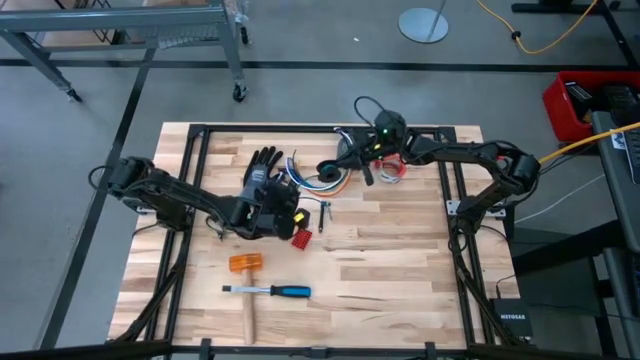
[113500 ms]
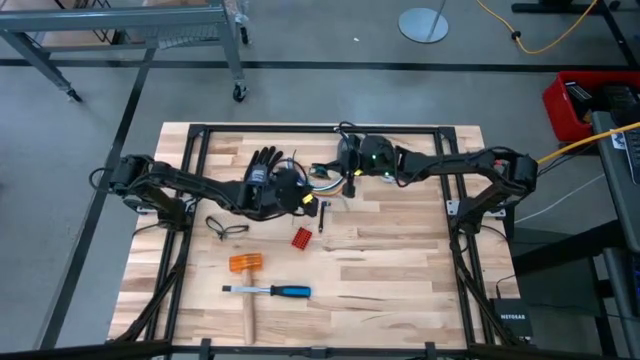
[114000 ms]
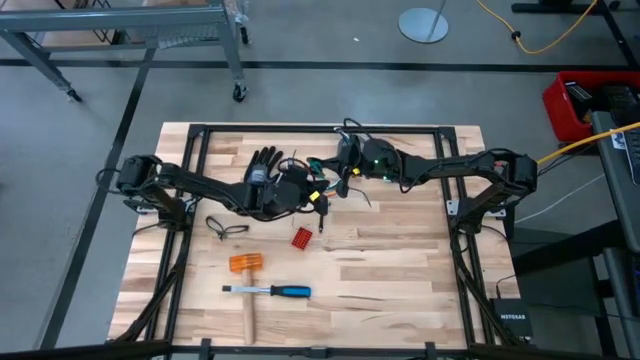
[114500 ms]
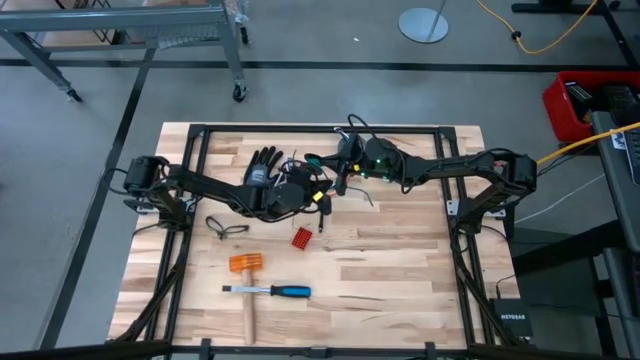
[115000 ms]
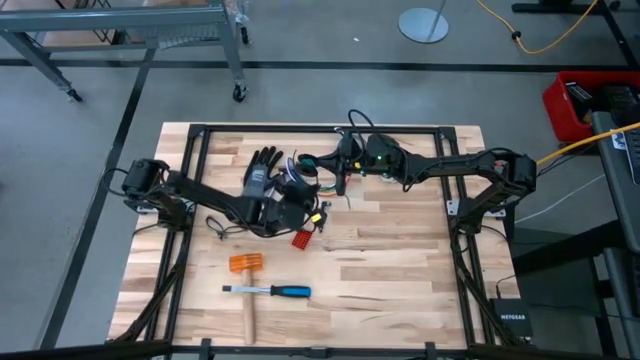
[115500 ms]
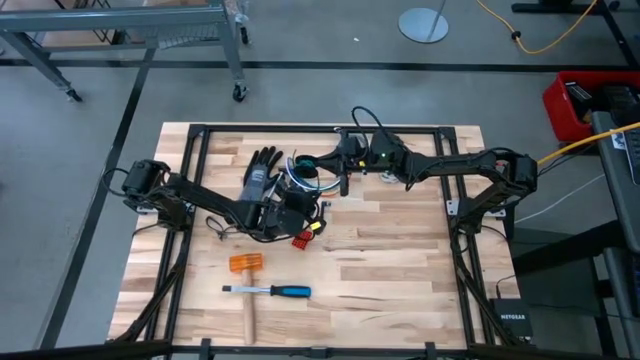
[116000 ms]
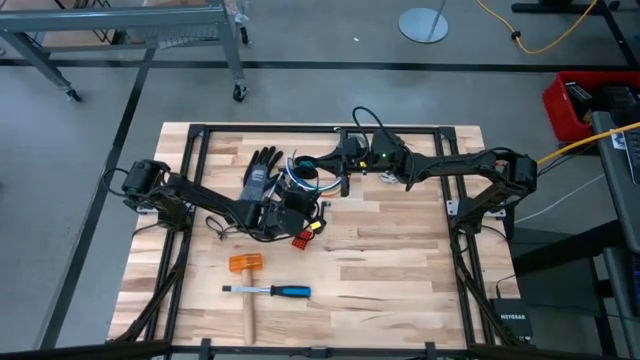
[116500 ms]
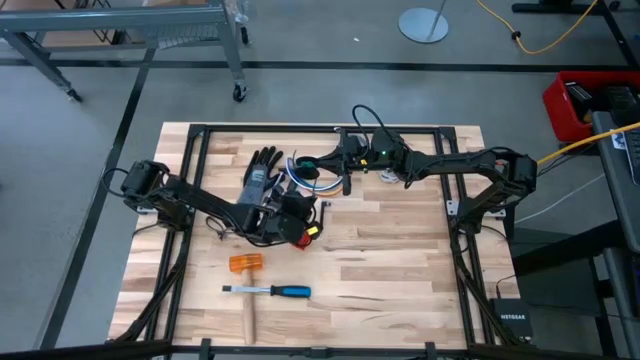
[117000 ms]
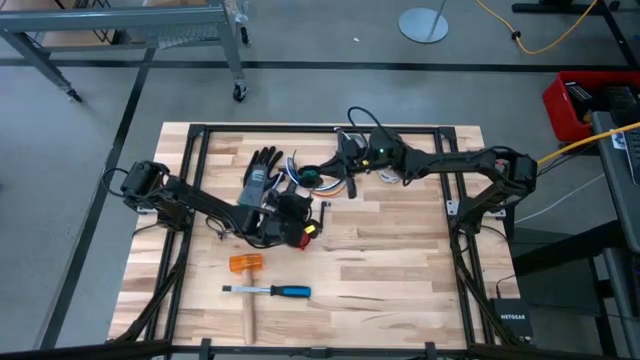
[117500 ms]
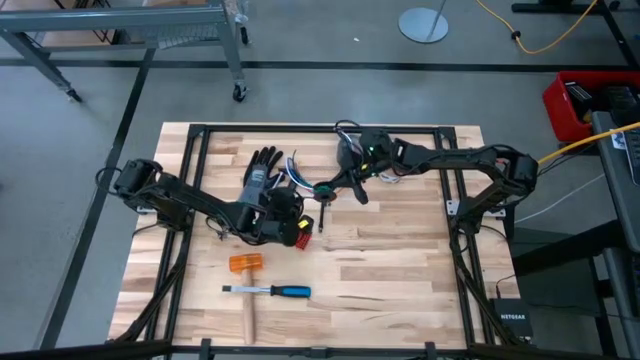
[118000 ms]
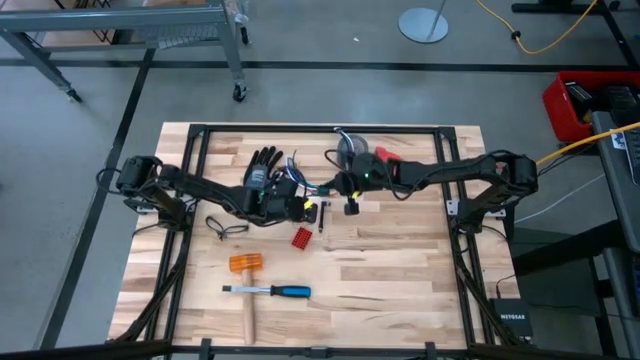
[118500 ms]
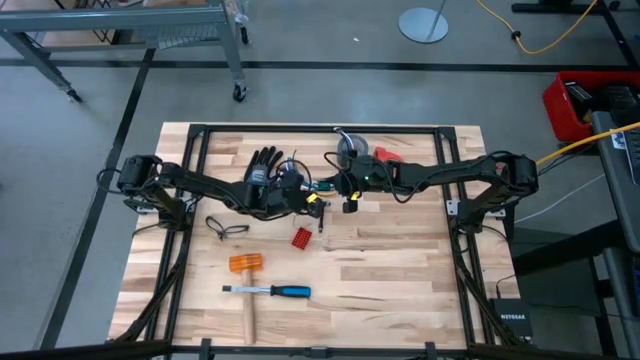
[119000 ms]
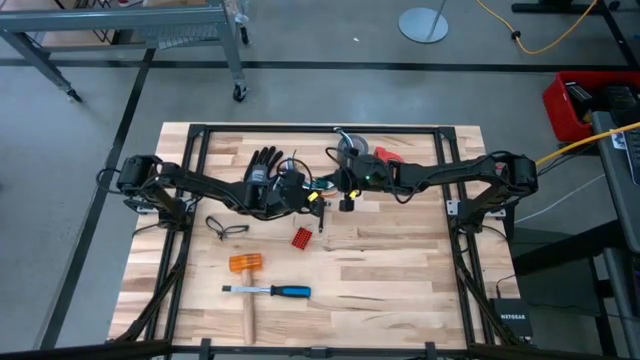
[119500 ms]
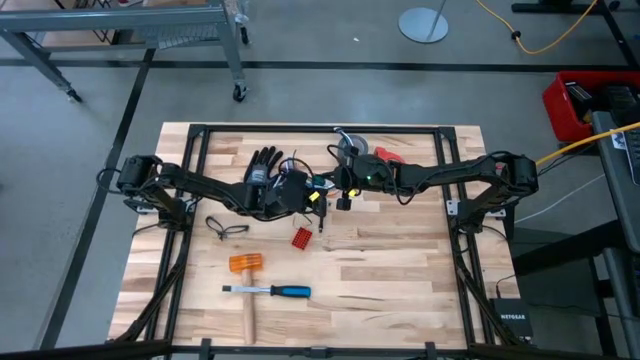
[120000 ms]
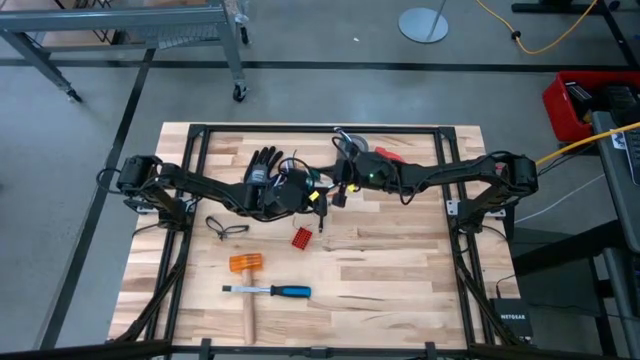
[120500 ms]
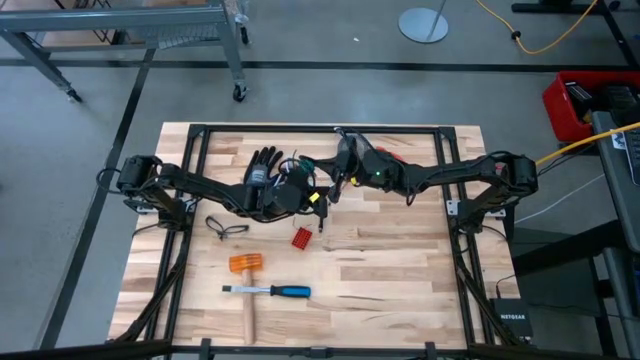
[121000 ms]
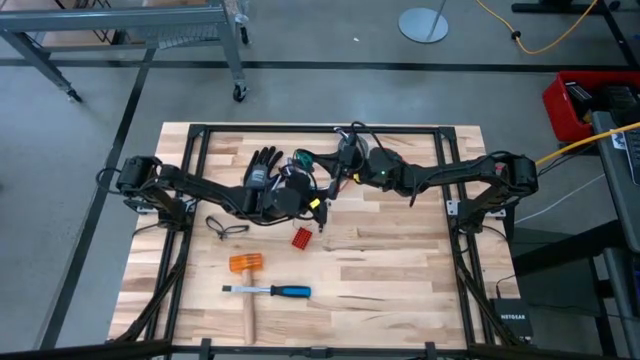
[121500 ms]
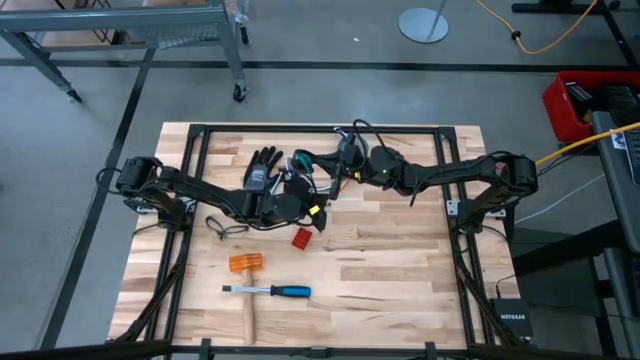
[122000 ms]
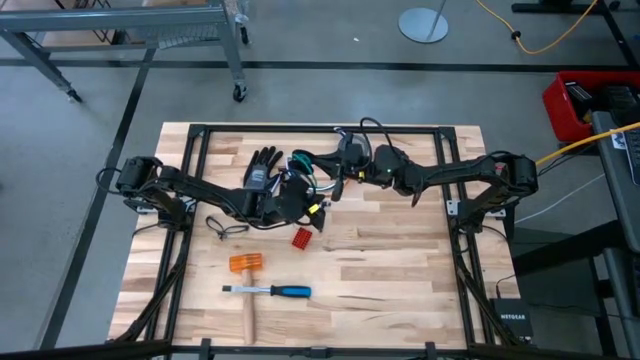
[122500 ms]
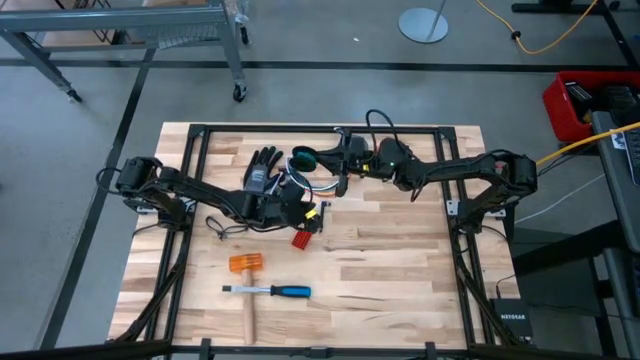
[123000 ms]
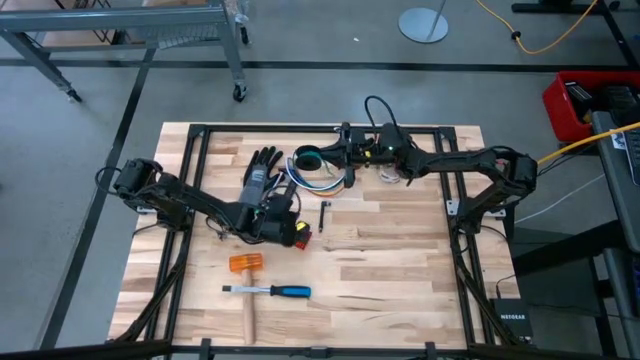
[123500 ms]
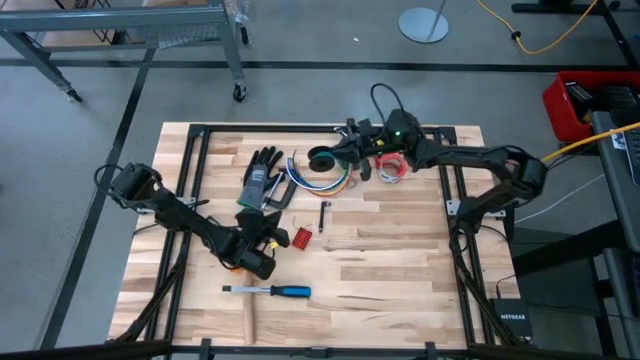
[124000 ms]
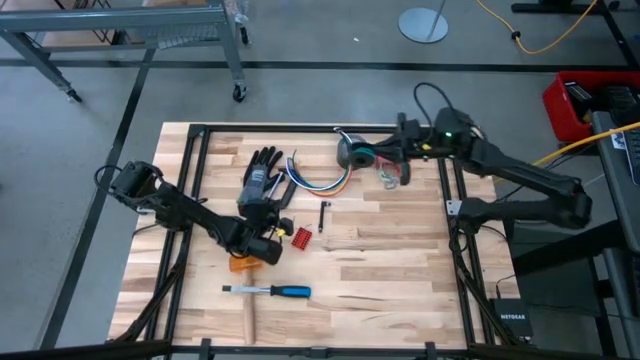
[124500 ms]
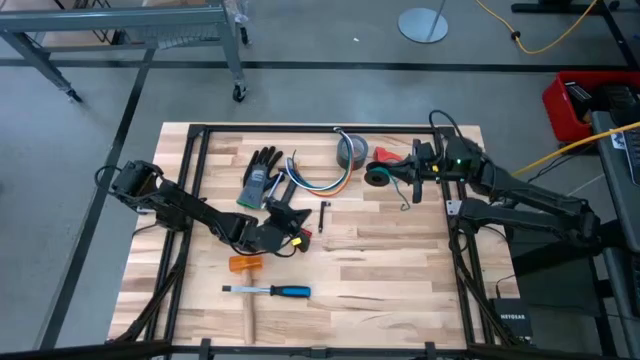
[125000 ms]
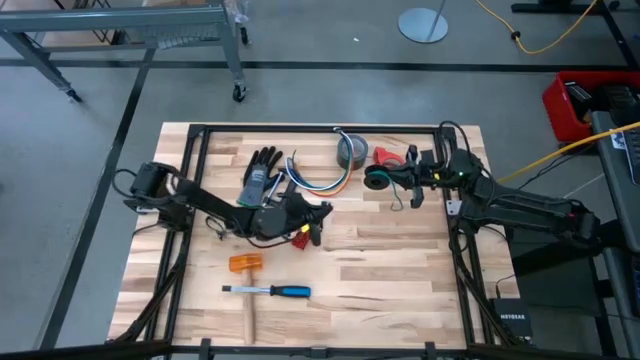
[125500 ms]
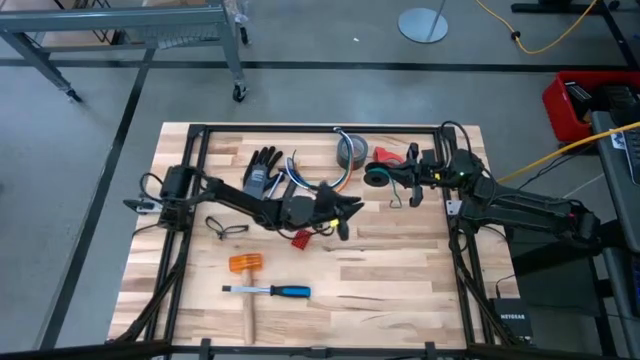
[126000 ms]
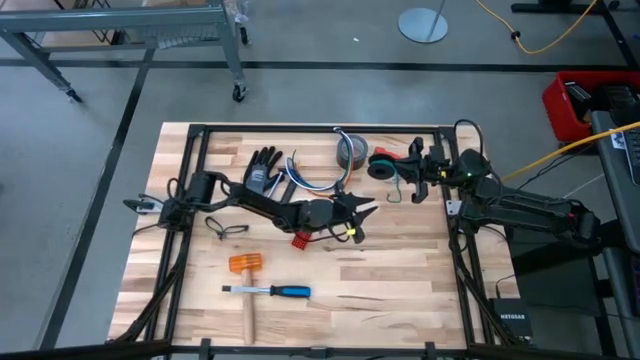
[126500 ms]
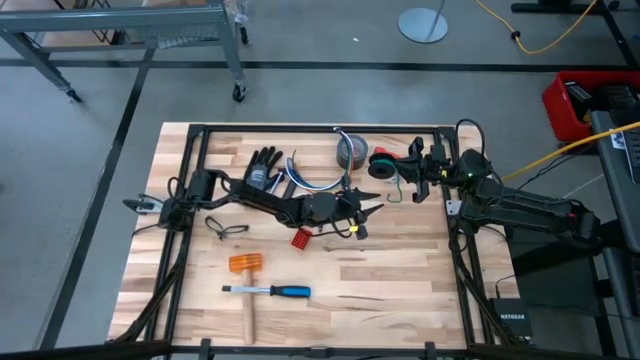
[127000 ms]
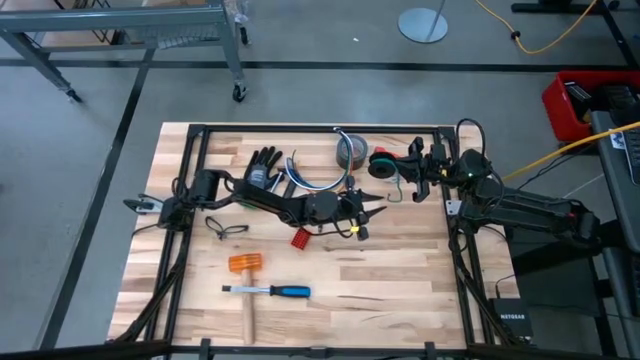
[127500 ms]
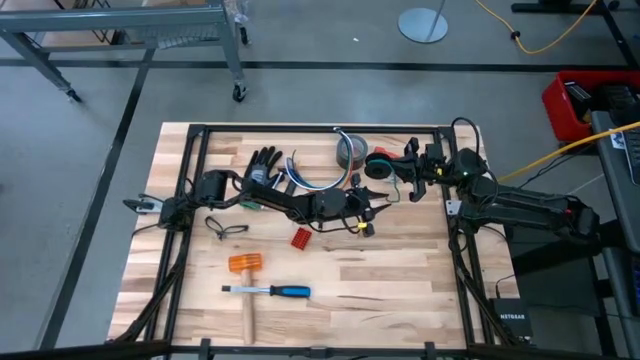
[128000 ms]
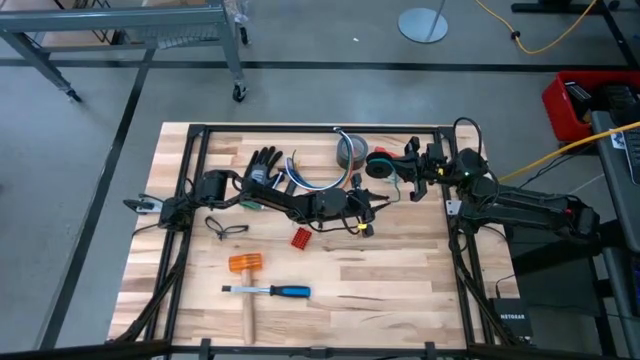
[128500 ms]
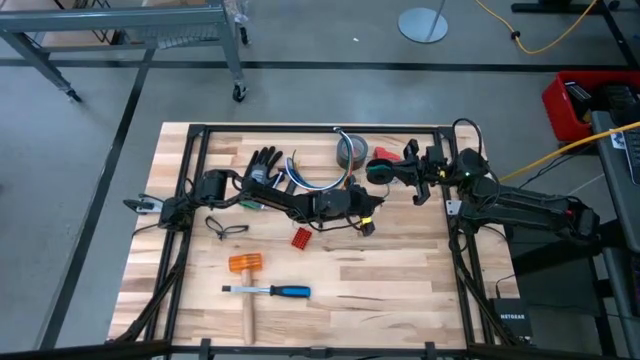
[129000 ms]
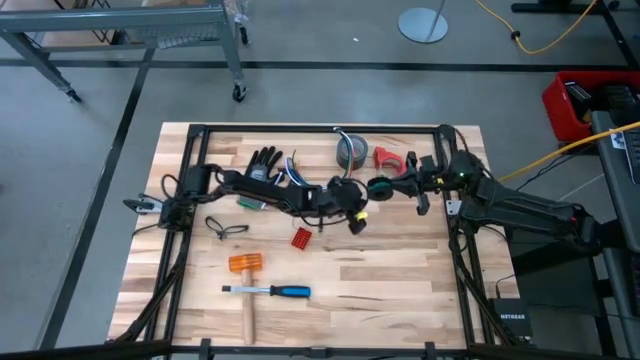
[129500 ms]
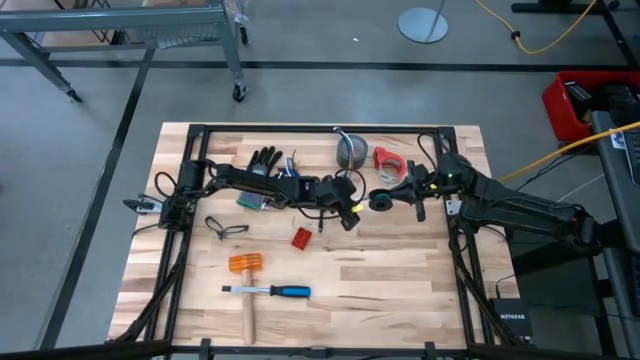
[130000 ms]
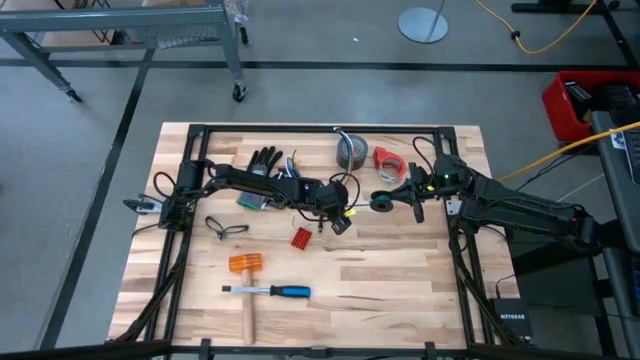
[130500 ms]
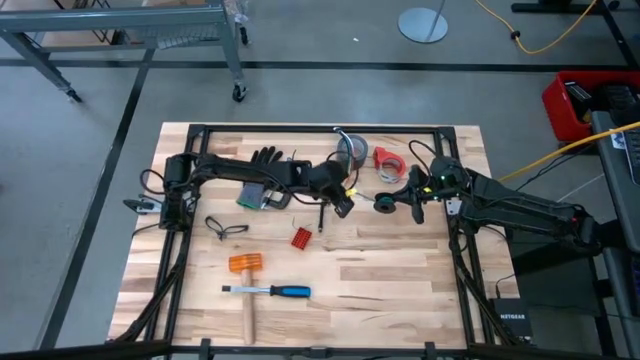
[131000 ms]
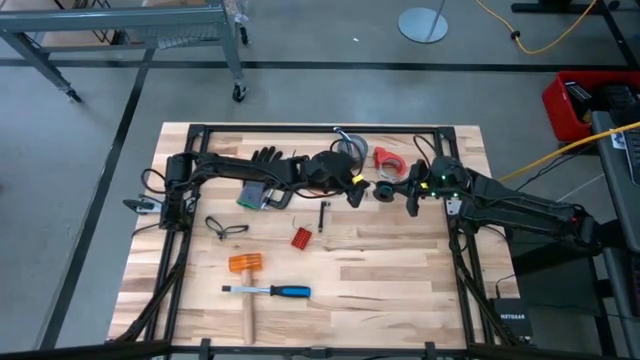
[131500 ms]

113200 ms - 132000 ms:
Task: Coil cords
Coil the green wire into the black spool

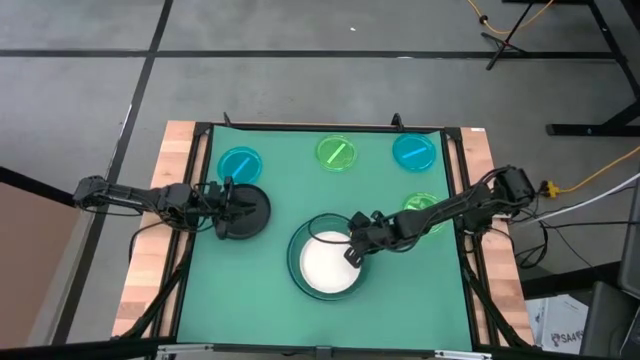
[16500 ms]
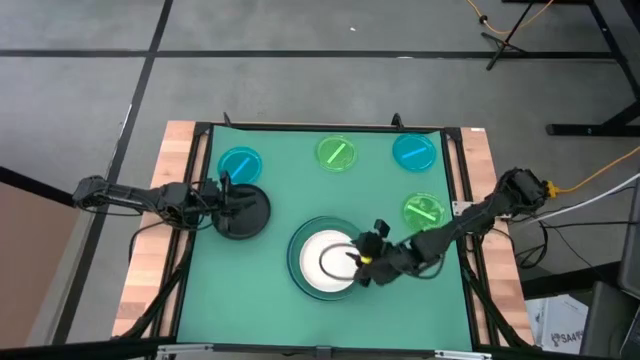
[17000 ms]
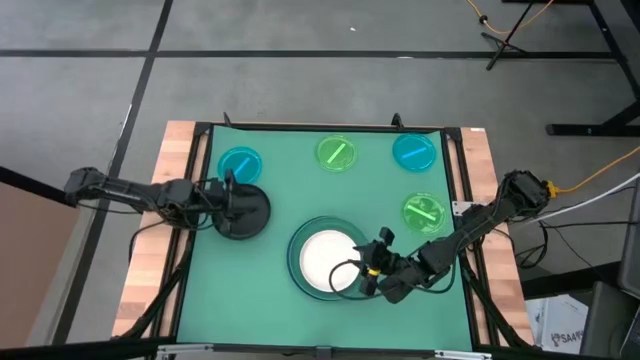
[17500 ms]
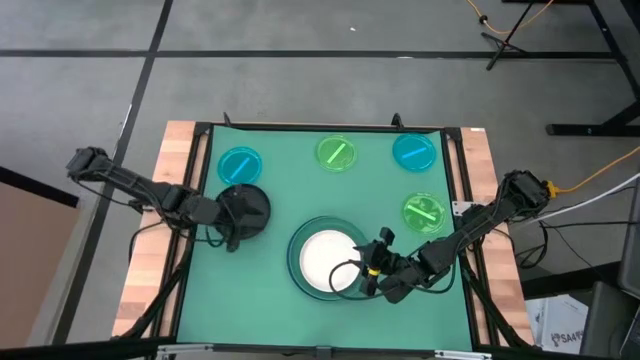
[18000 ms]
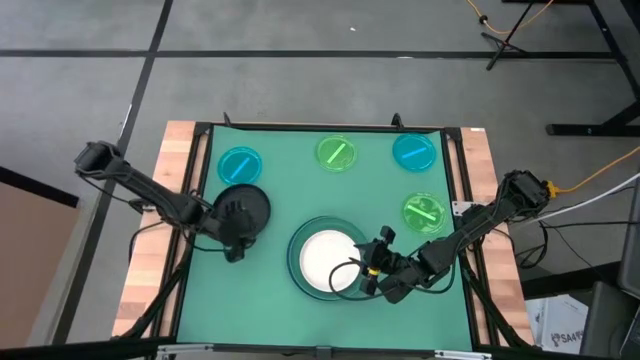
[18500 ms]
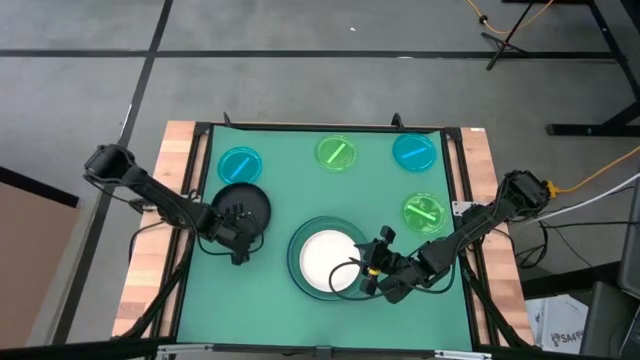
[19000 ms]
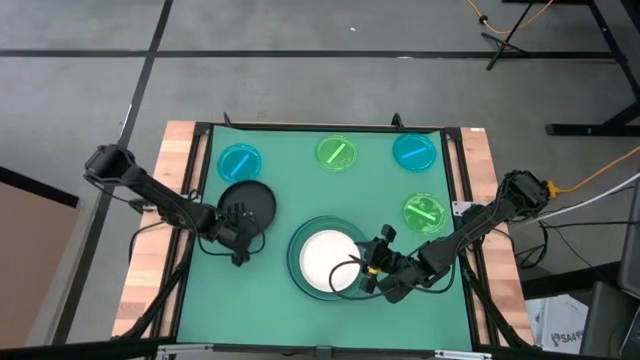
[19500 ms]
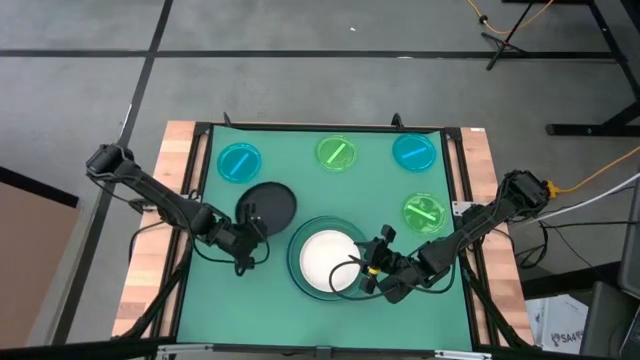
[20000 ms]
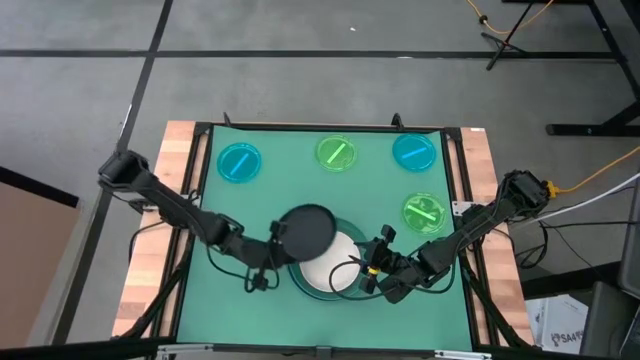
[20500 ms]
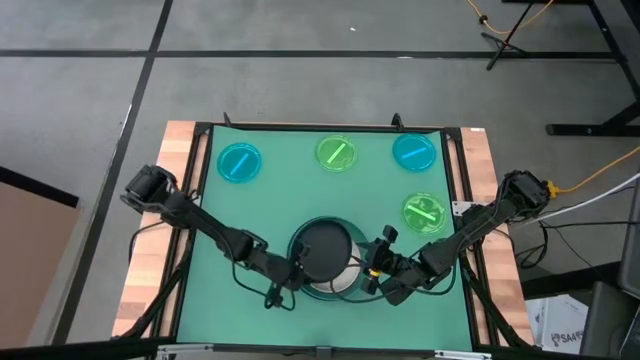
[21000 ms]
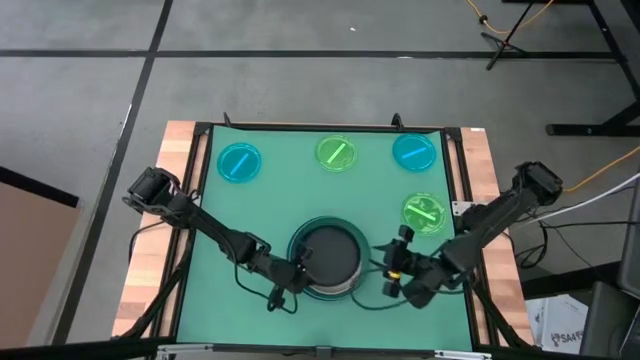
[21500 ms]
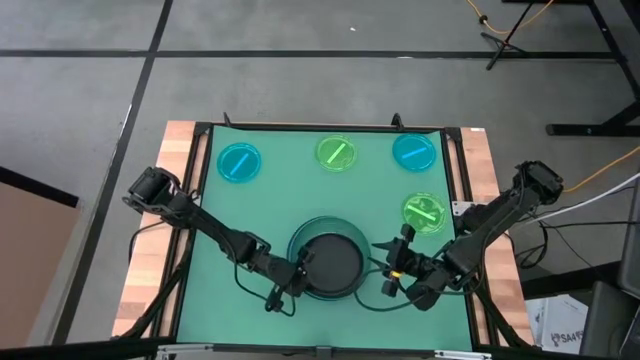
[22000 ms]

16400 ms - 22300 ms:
Task: Stack plastic plates
Stack the black plate on the white plate
